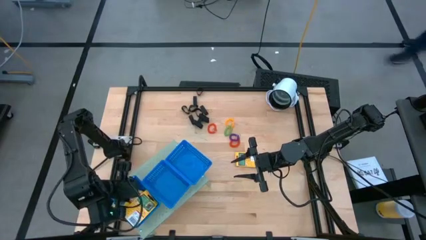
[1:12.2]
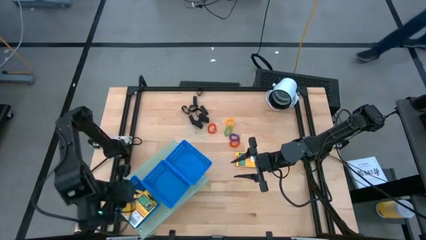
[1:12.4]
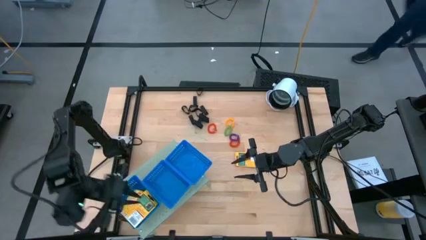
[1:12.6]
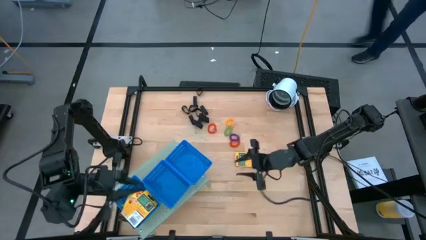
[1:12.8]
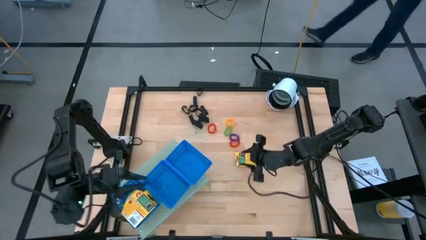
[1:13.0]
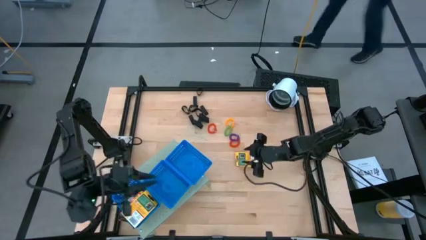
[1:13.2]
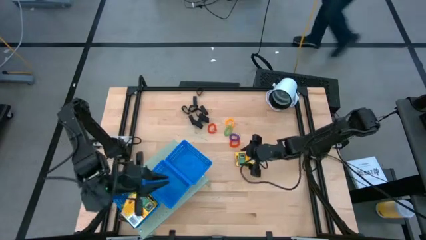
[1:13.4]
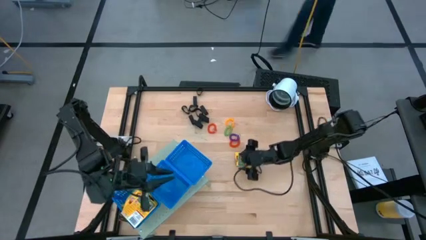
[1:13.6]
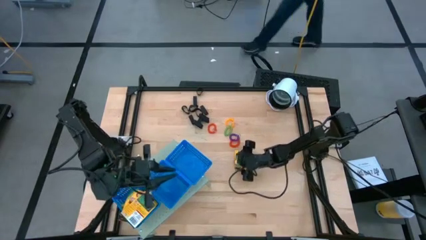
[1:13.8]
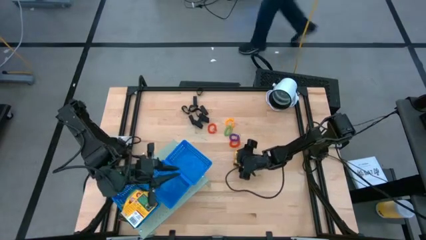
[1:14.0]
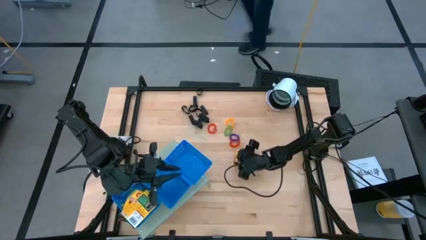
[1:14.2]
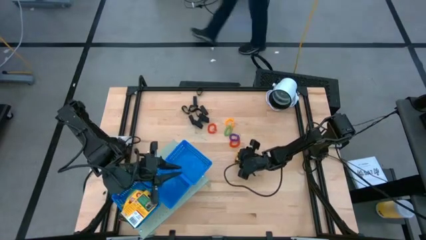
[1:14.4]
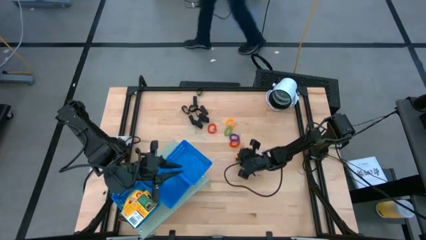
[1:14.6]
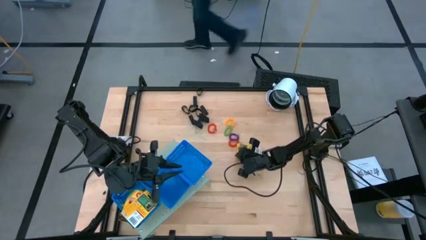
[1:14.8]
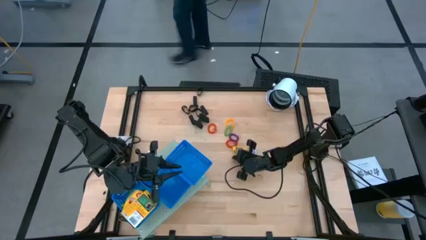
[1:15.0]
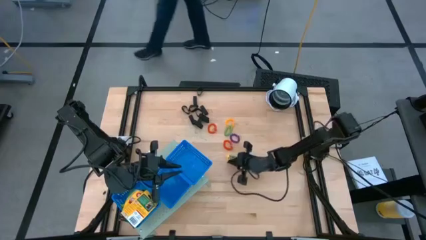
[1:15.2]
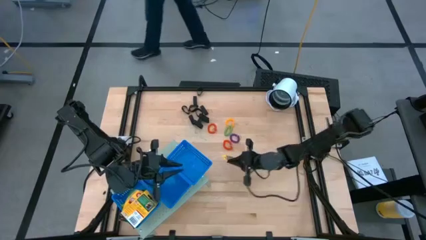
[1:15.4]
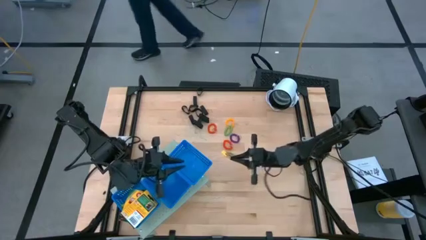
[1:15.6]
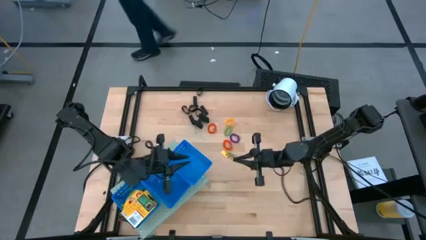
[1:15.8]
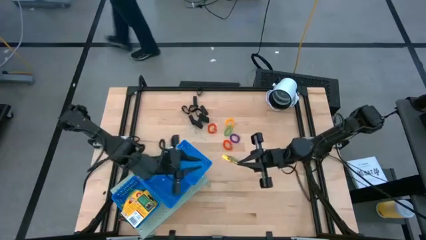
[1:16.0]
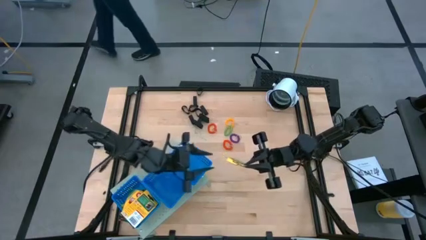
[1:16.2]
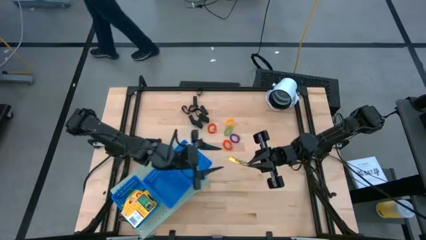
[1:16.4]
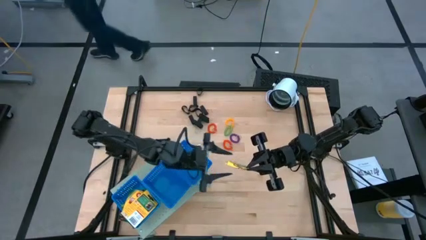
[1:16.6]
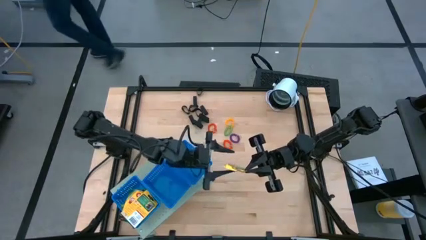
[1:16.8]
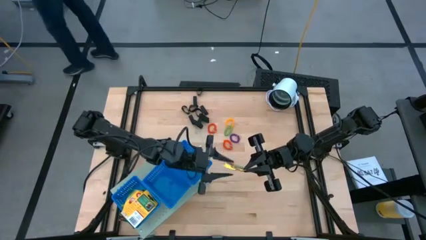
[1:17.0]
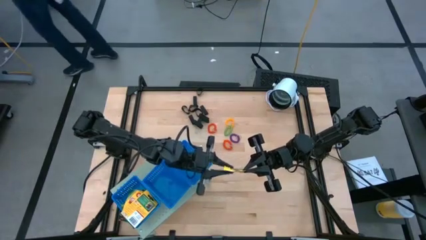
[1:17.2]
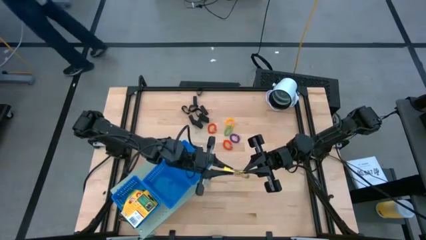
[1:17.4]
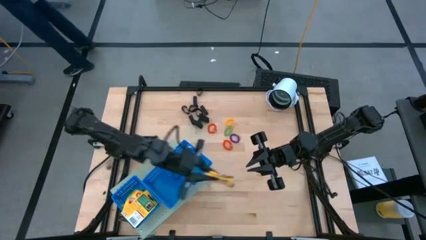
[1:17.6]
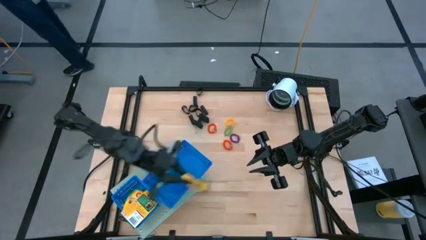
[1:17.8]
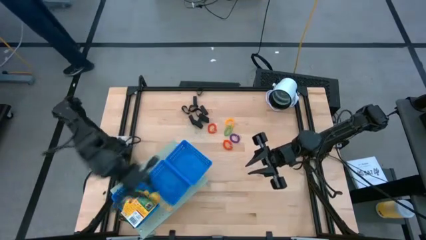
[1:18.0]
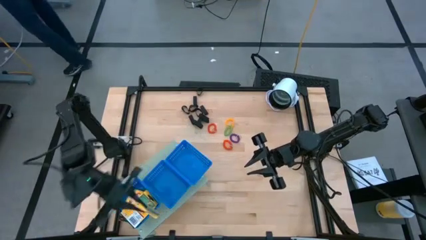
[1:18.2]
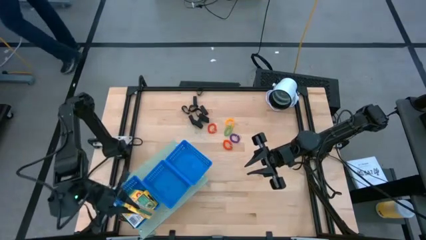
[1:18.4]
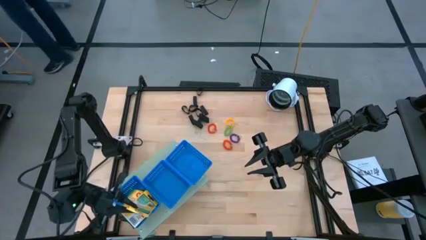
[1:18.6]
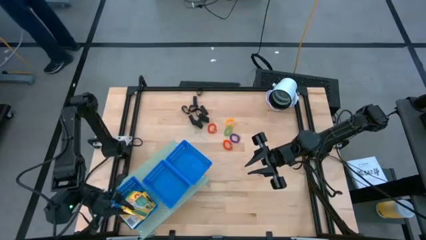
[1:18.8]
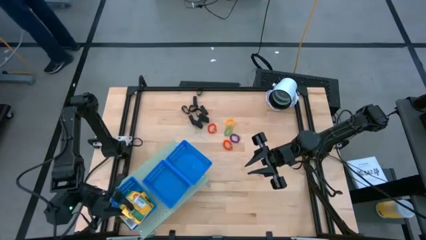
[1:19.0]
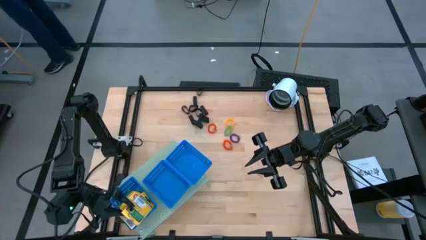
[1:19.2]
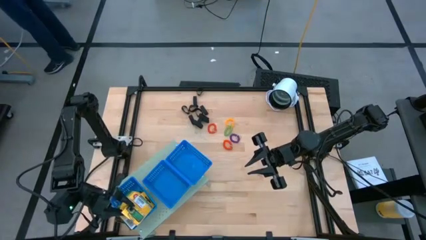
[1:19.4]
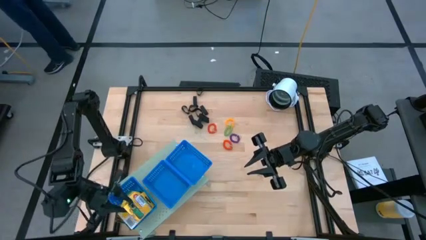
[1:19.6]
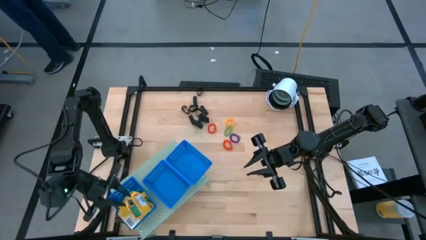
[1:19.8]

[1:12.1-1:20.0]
Task: Pick & Place Office Desk Supplies
Put the yellow crayon box into the bottom blue basket on the shelf

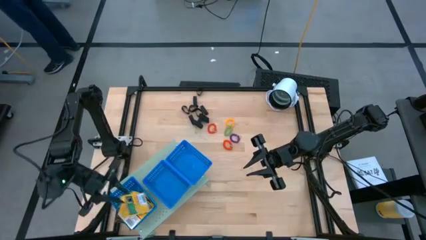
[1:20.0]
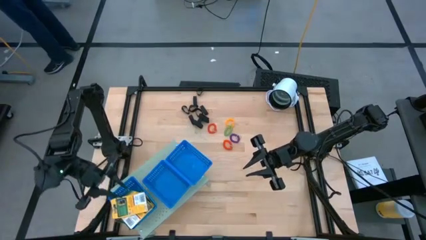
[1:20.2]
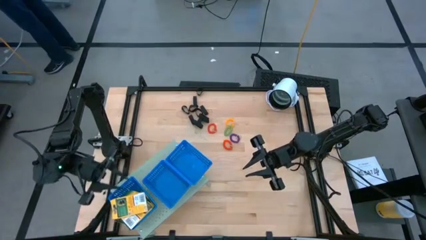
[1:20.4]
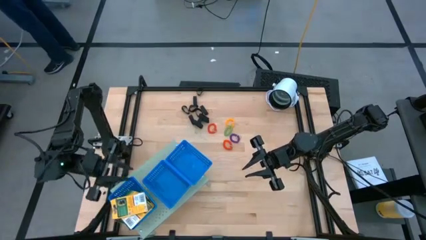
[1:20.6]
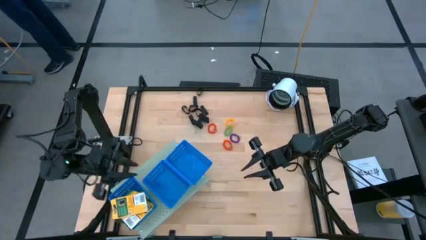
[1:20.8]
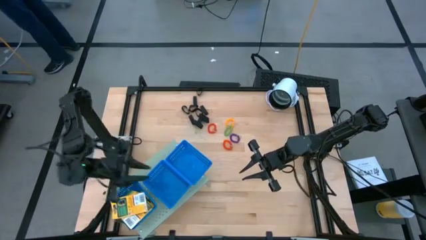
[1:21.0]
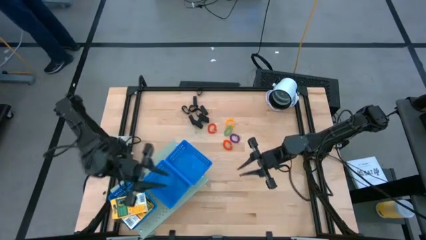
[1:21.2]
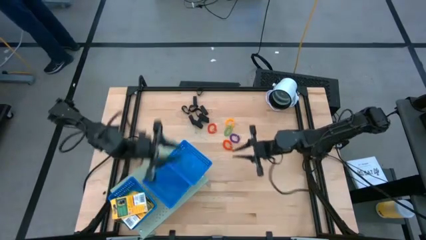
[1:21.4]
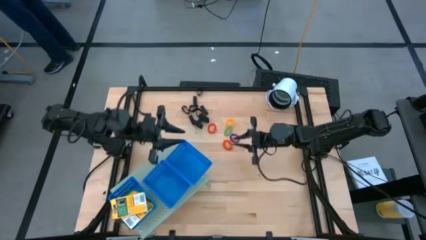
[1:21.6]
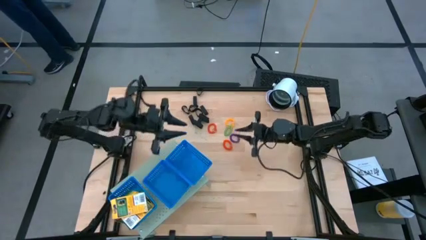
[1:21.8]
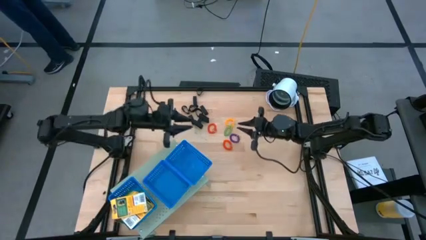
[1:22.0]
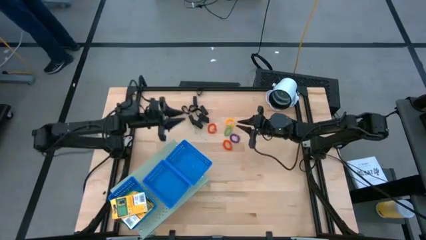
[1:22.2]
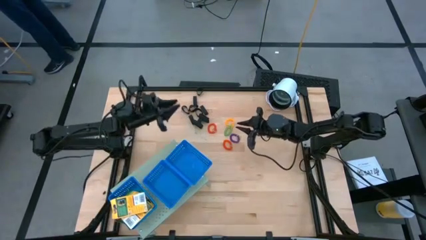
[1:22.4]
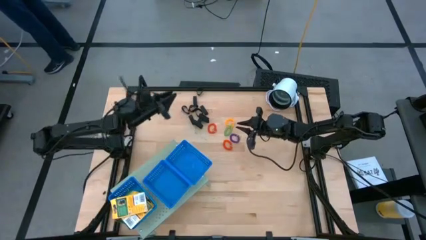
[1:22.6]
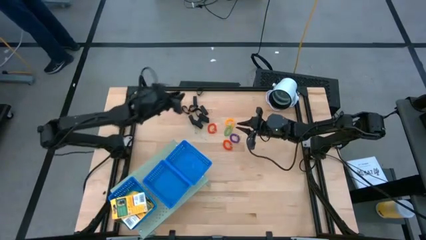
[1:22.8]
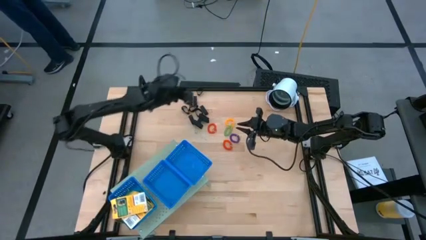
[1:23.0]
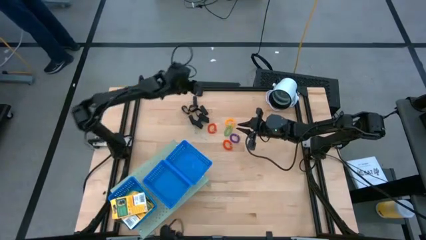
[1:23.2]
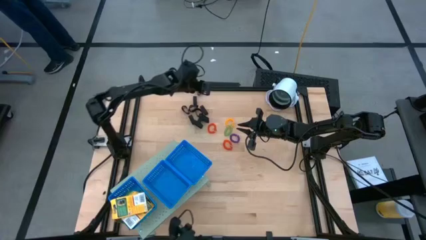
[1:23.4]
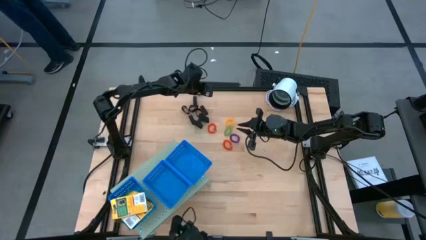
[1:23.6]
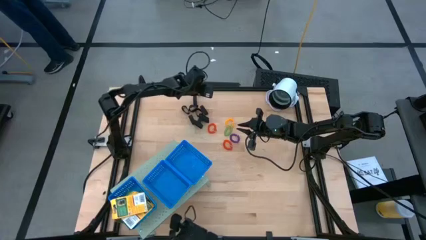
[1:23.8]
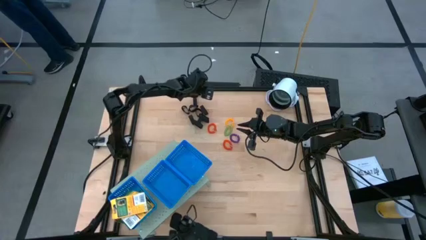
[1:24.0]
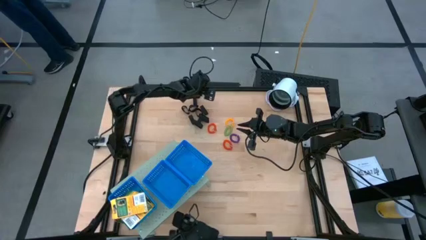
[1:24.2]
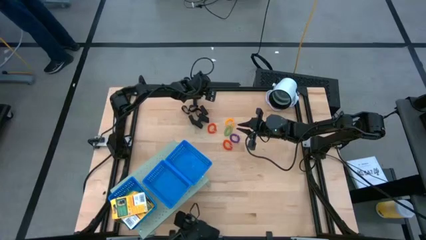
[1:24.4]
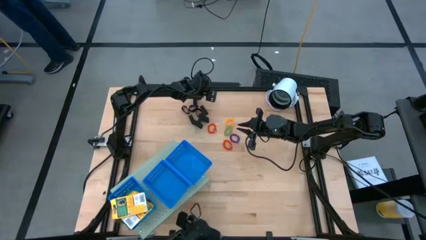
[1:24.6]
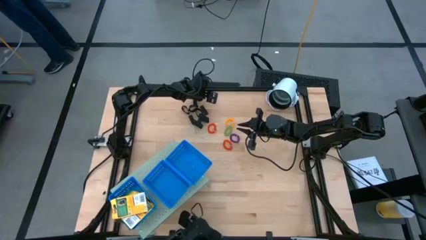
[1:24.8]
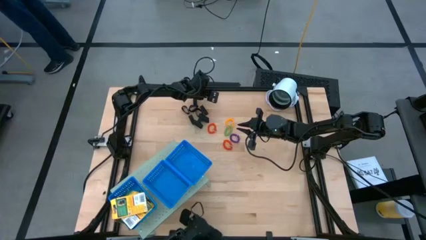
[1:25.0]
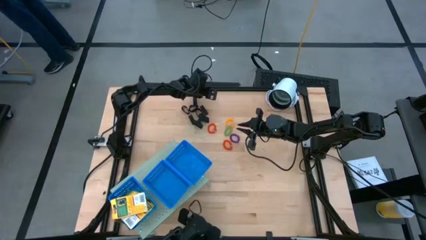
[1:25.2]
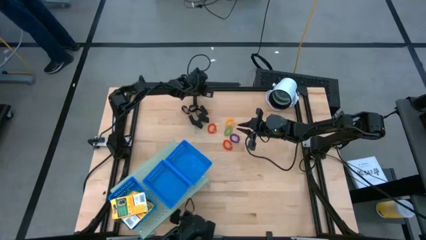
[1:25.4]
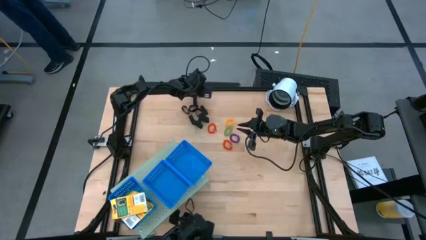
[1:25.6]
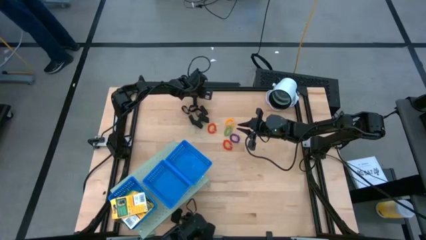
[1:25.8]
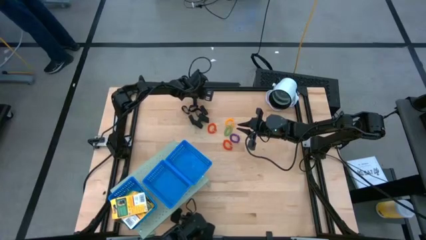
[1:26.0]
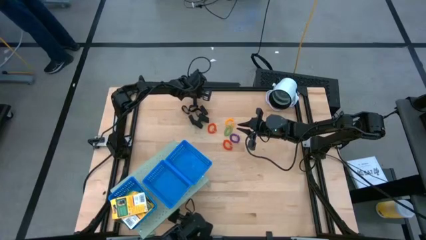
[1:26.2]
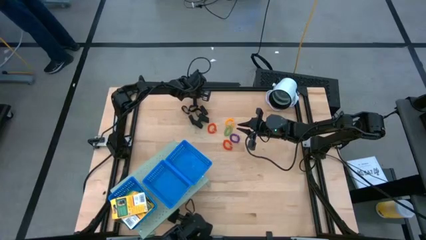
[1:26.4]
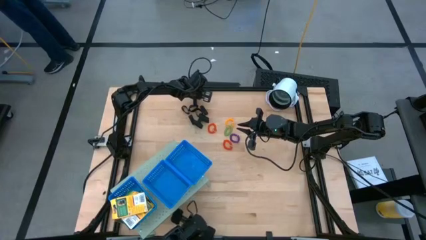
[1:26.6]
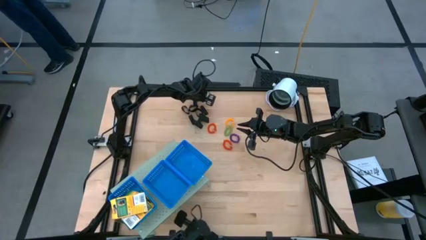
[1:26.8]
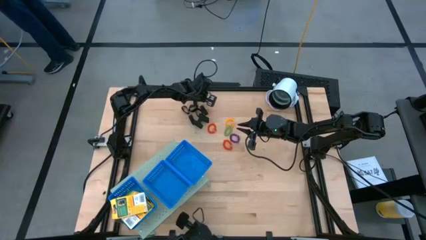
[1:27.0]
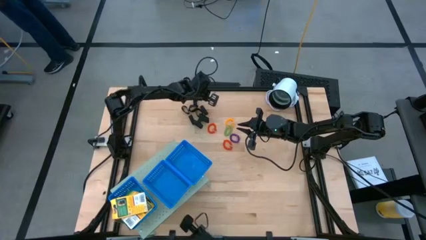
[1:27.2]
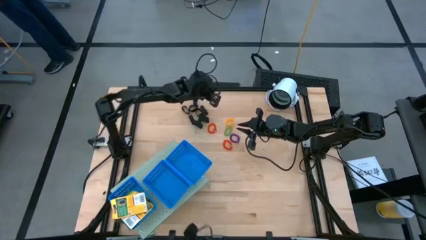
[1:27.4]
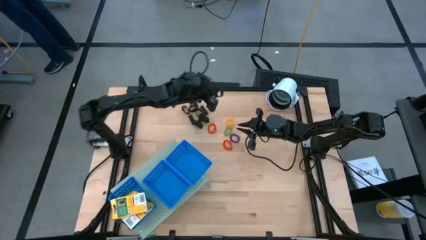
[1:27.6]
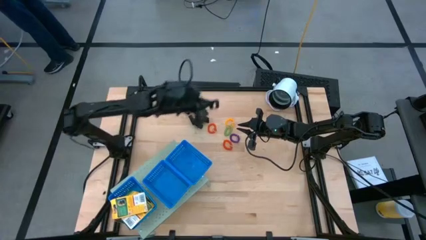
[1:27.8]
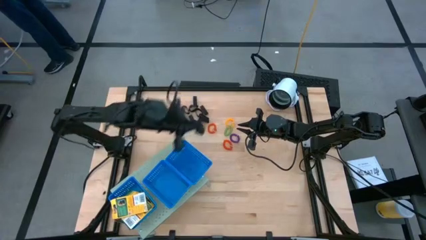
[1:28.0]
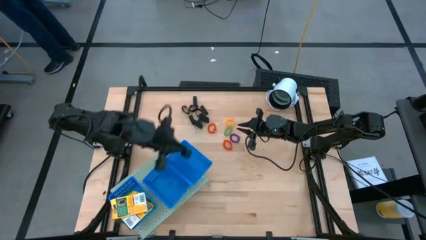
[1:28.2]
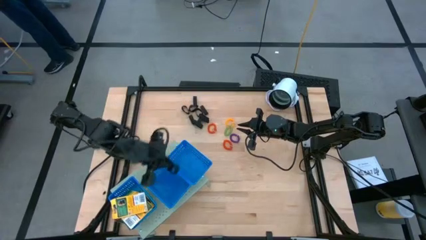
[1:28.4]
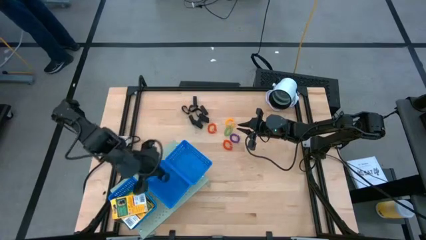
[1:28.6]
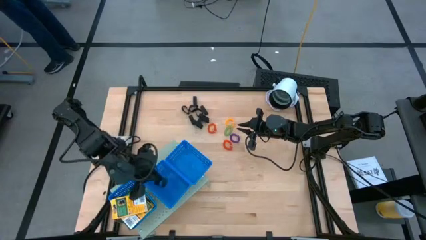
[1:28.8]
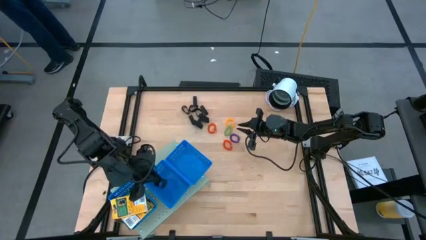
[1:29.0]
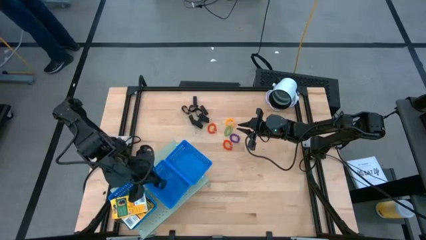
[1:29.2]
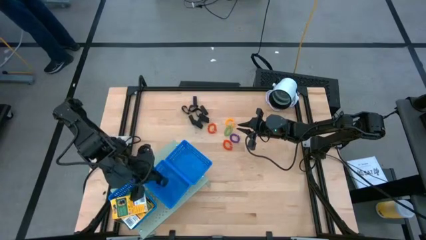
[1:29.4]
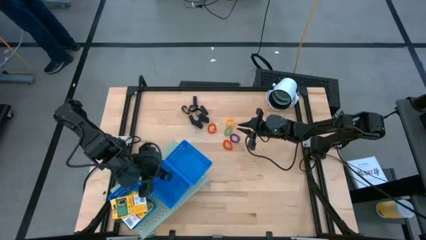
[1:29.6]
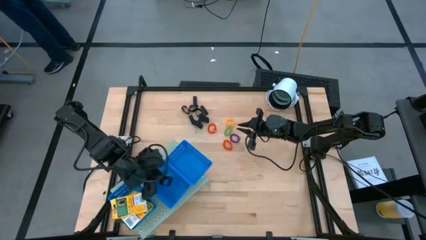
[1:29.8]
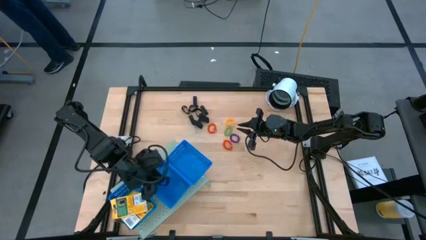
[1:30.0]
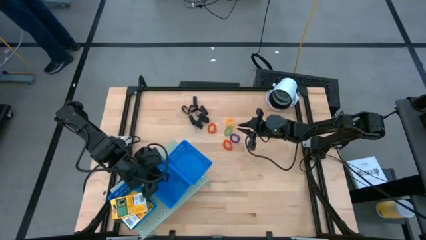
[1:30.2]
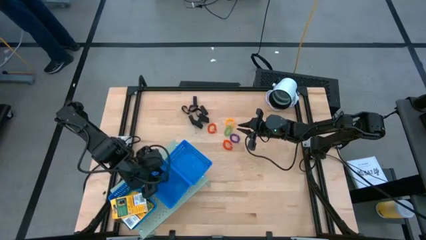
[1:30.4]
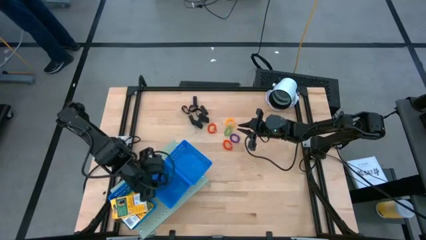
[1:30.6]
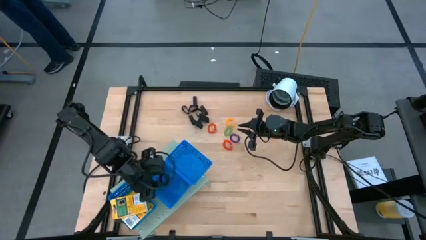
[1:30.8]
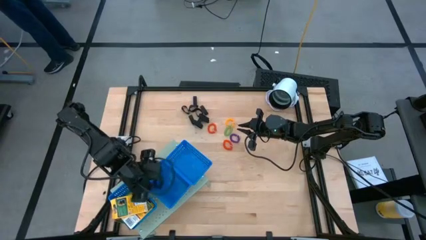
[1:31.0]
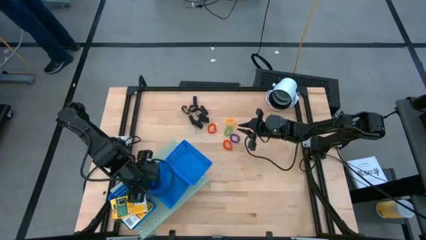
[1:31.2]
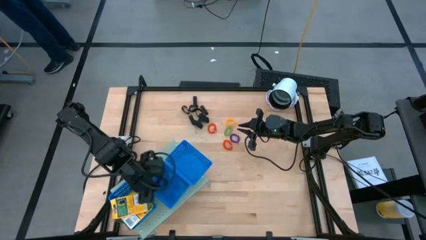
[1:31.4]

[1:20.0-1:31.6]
Put the black rubber band into the center blue basket on the shelf
